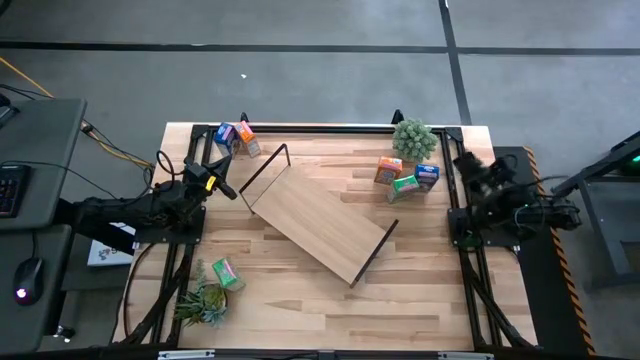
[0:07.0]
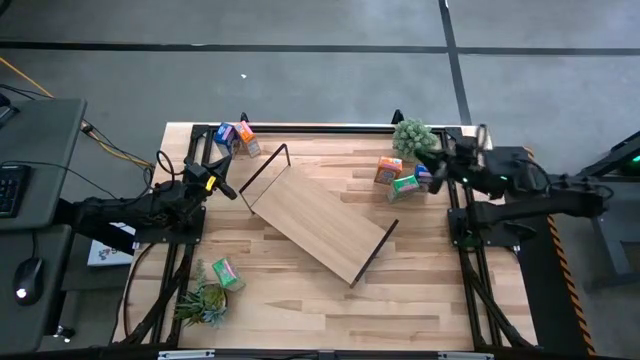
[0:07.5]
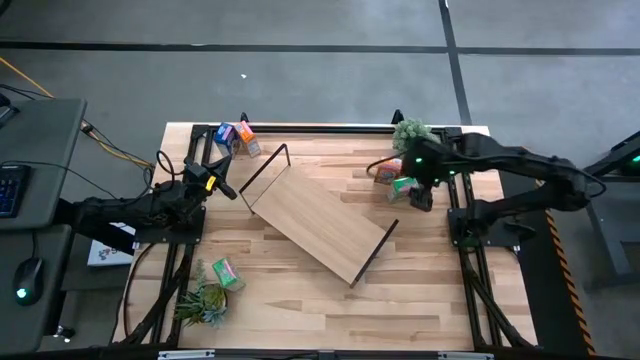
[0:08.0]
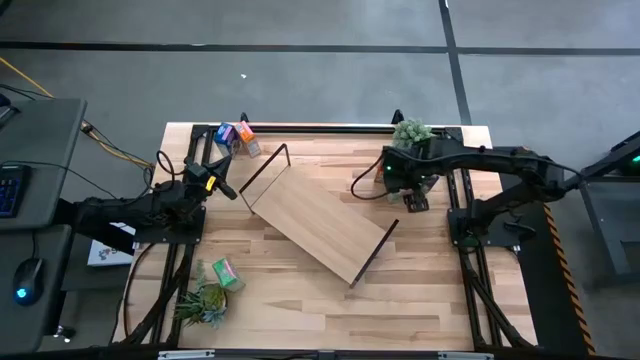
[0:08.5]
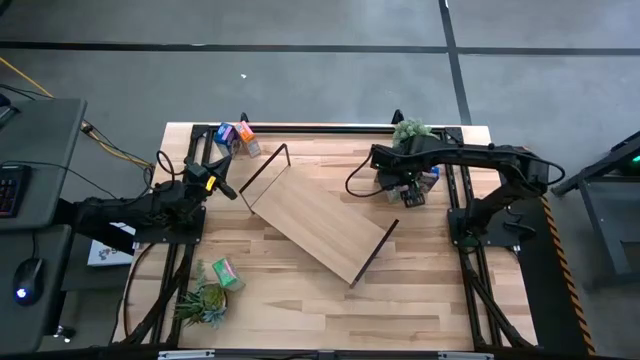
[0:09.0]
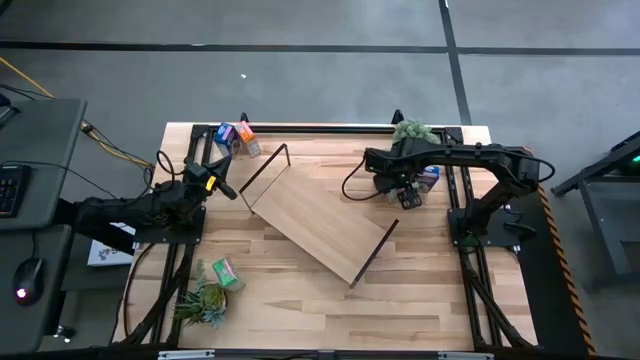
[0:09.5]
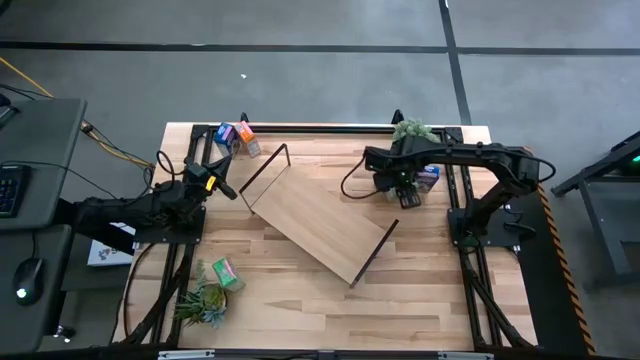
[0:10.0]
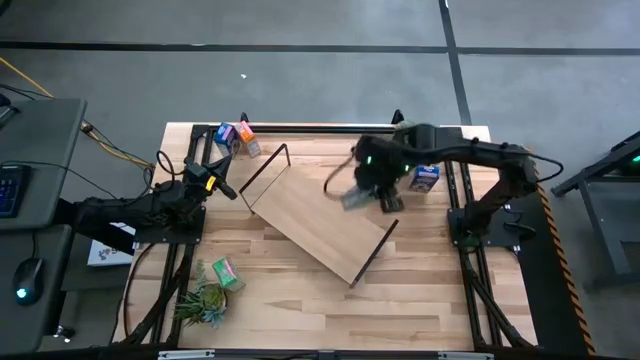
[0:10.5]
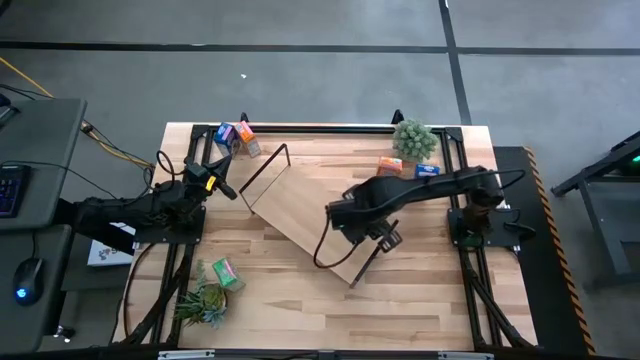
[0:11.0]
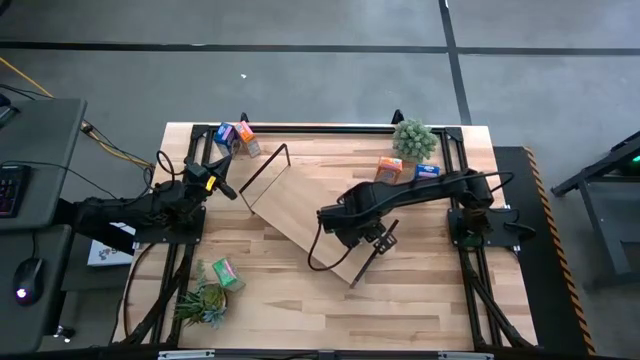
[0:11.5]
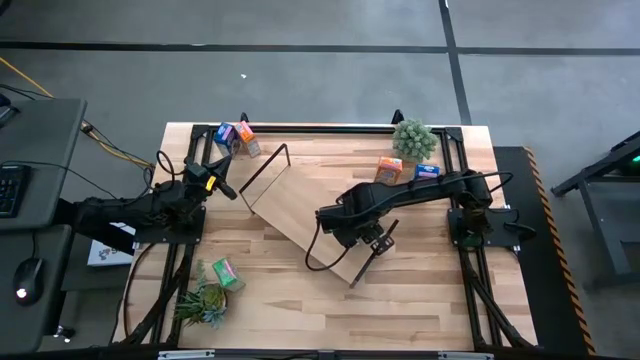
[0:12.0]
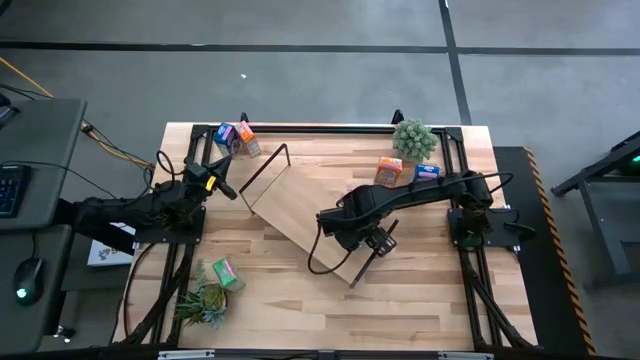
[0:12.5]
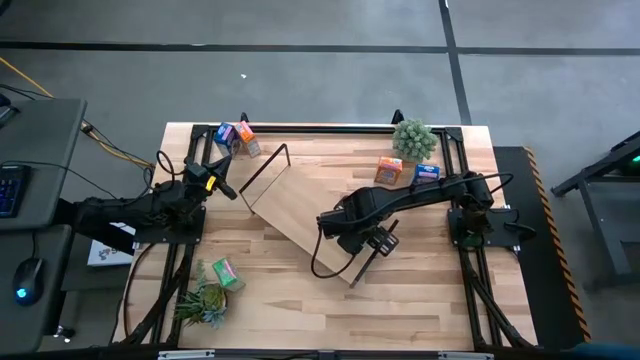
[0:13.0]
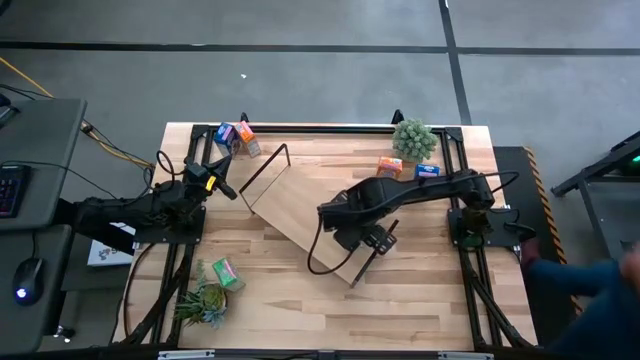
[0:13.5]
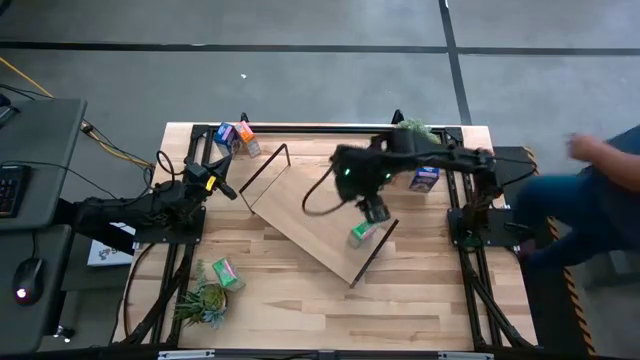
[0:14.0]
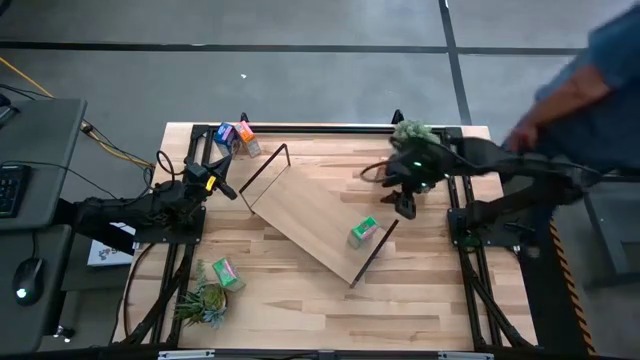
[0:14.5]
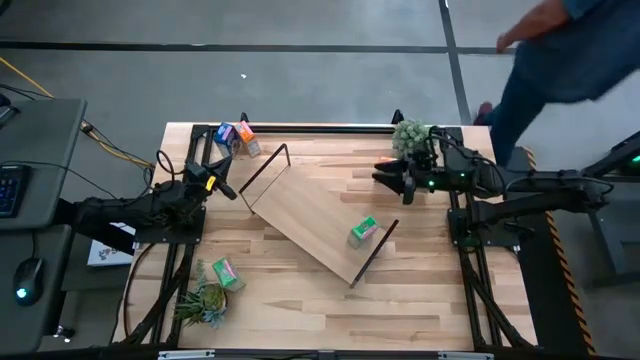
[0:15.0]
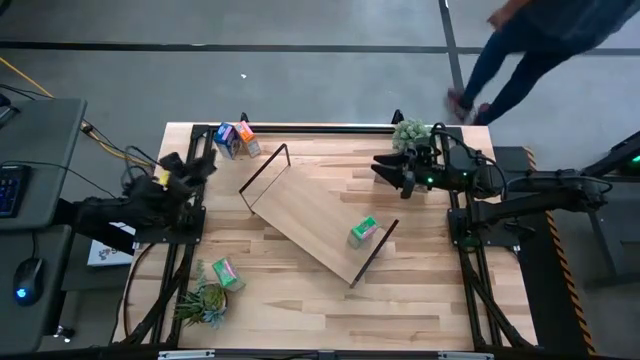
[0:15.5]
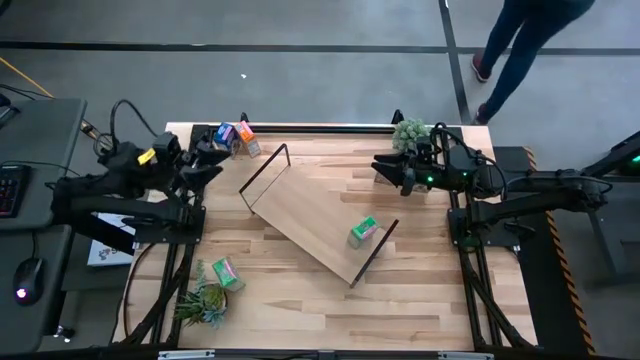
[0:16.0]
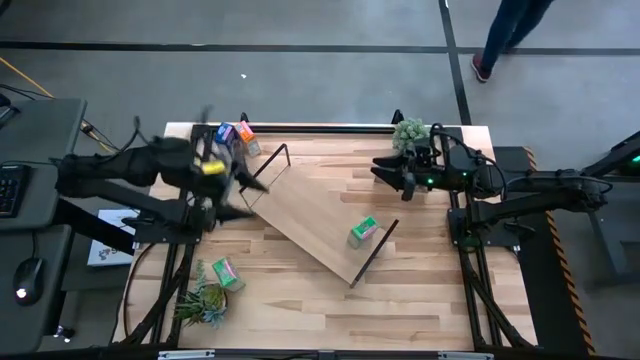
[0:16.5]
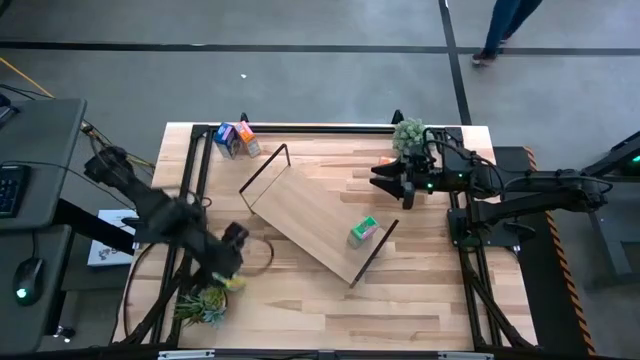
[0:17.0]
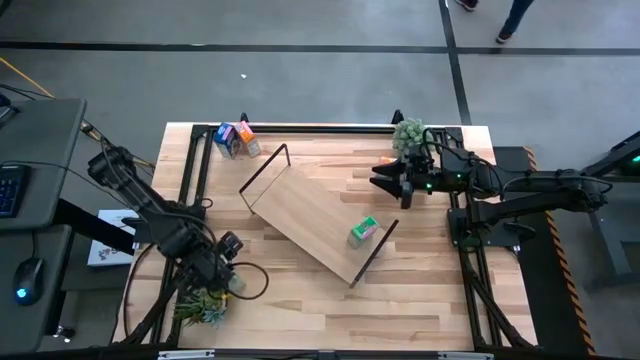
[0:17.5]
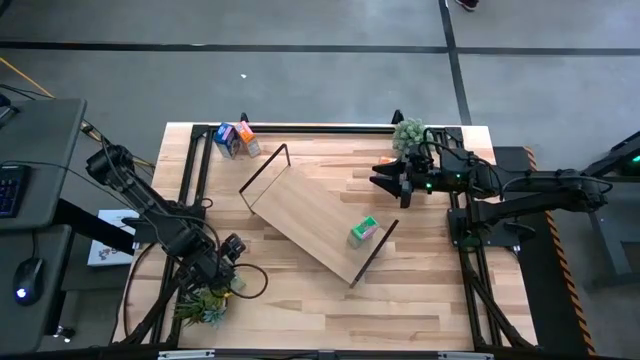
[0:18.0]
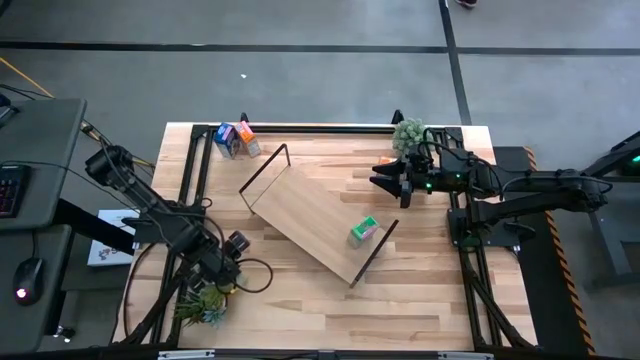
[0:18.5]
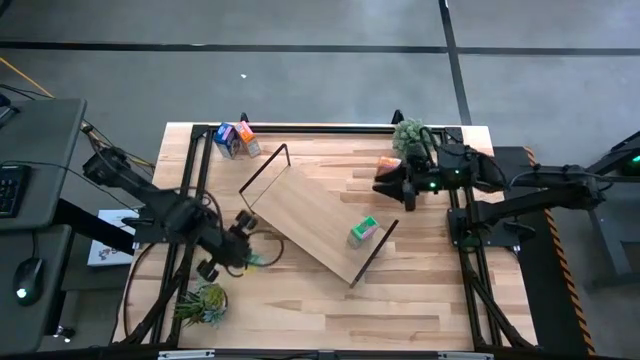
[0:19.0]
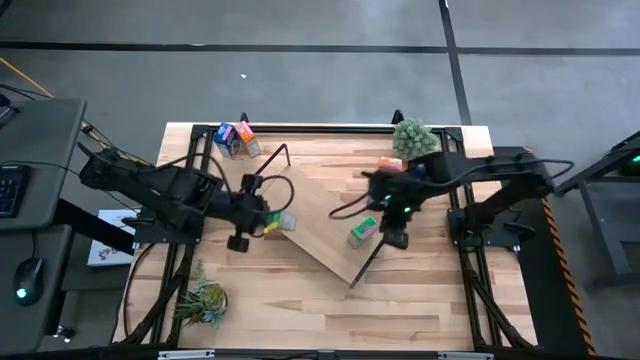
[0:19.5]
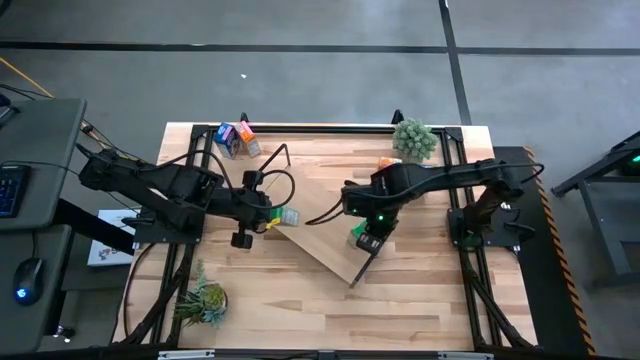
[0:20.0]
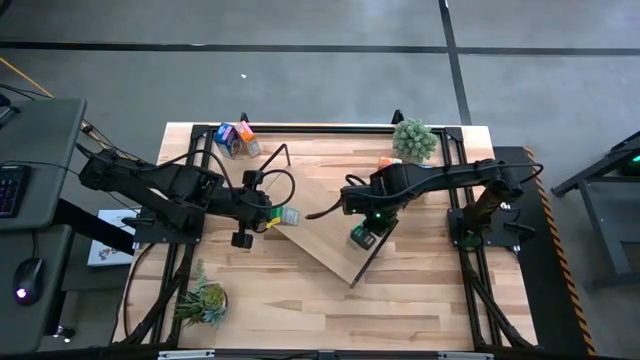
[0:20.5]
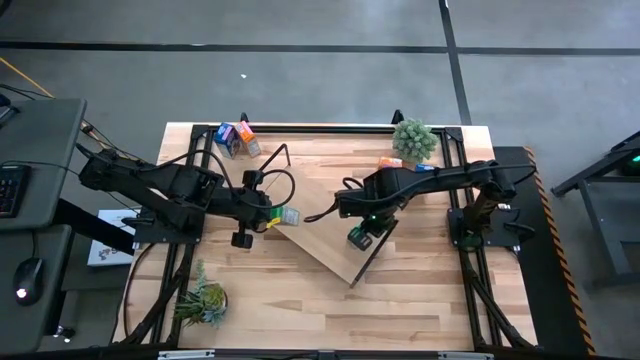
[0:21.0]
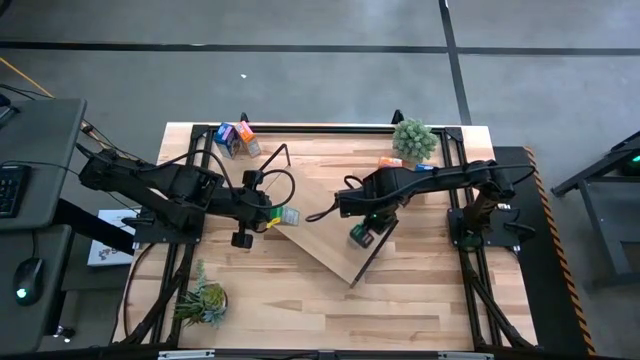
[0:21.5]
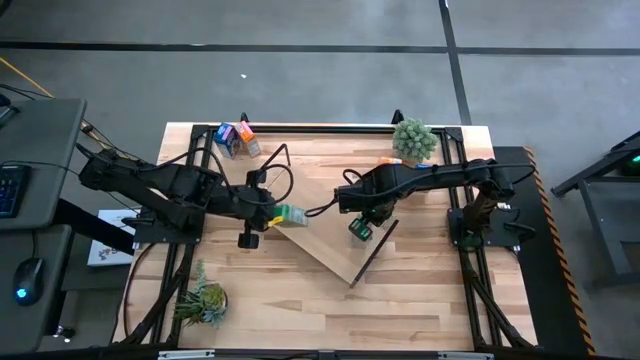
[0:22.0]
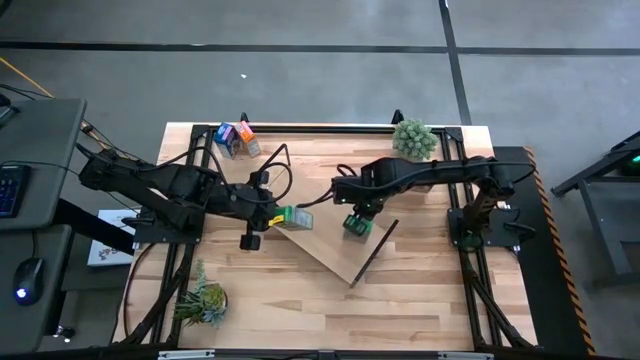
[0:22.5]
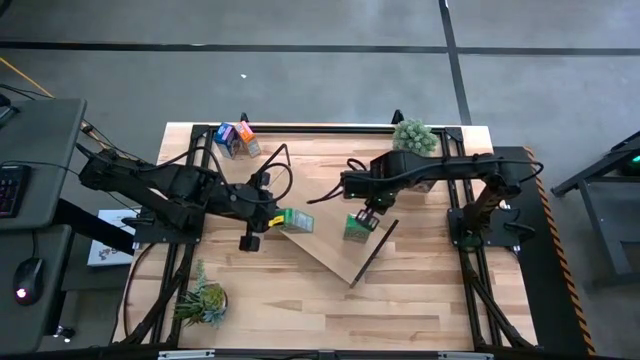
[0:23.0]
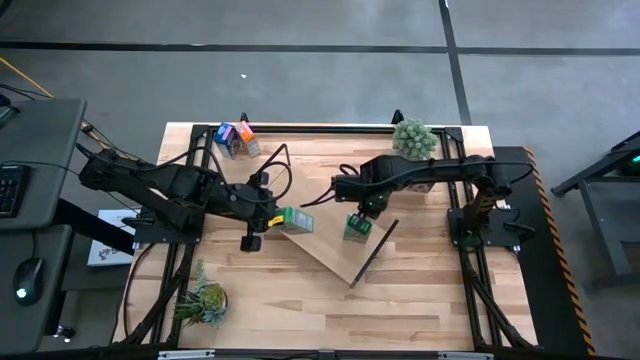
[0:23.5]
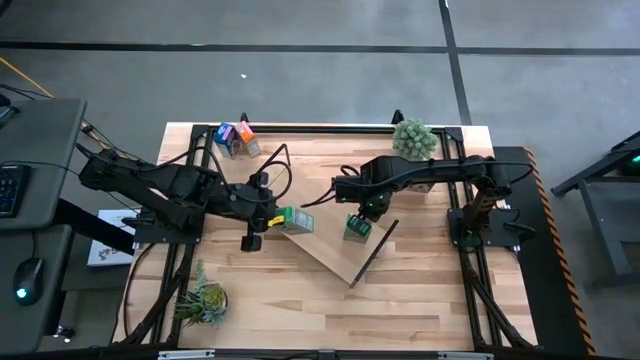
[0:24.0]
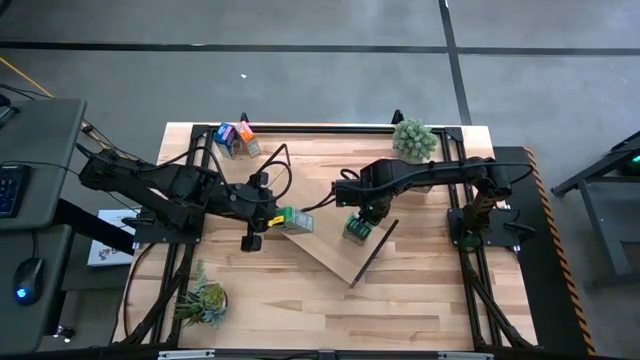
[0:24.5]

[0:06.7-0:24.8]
Task: Stack cereal on shelf
Put the top green cereal box on the shelf

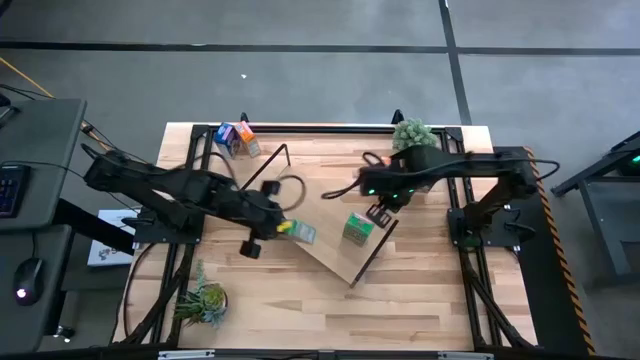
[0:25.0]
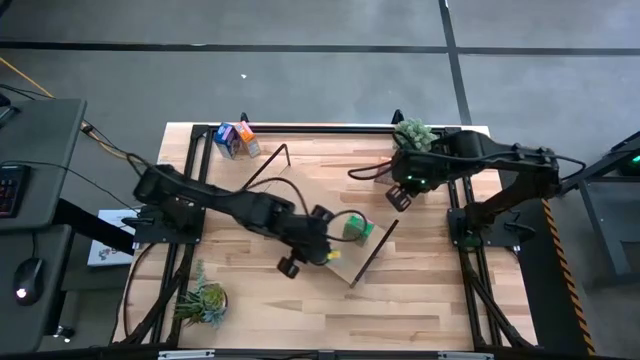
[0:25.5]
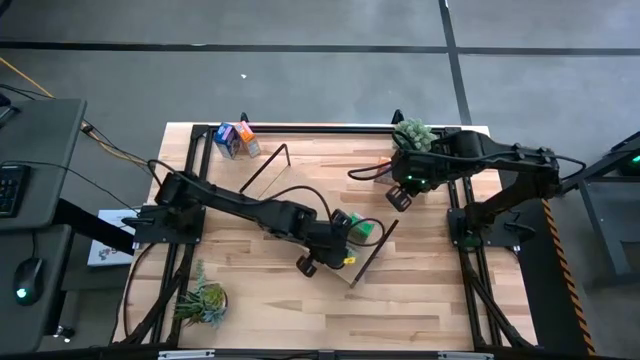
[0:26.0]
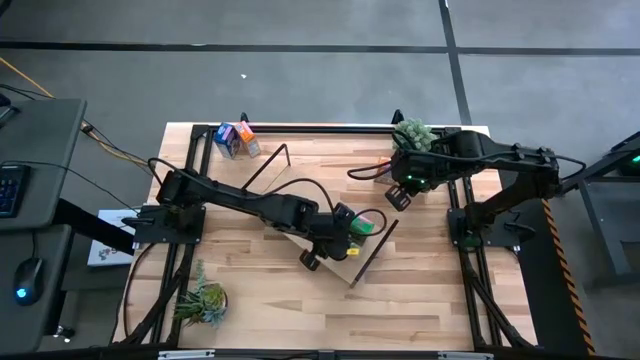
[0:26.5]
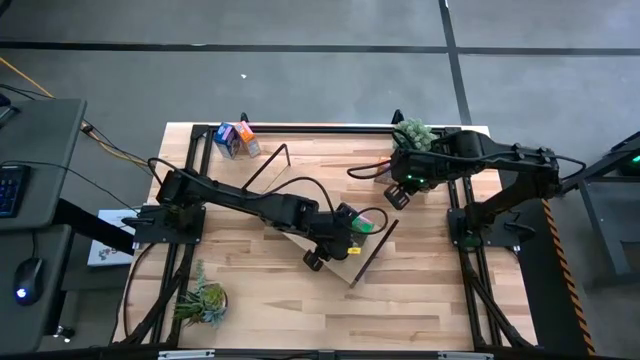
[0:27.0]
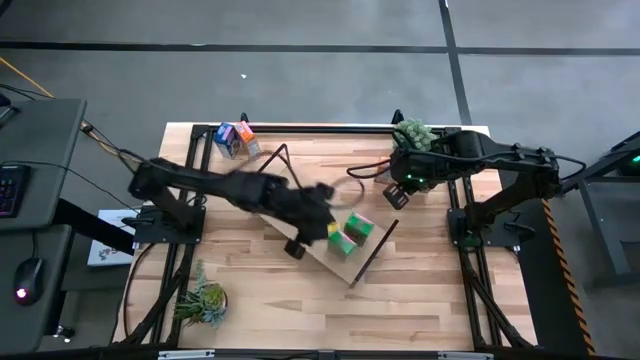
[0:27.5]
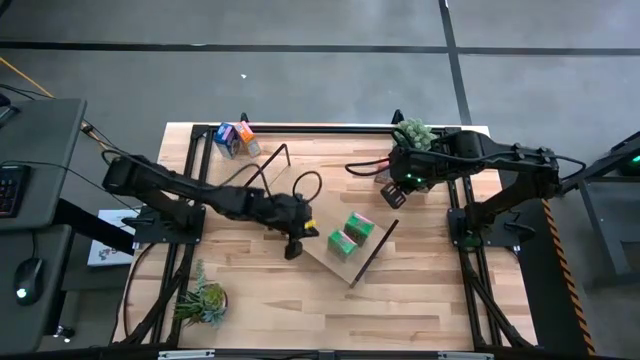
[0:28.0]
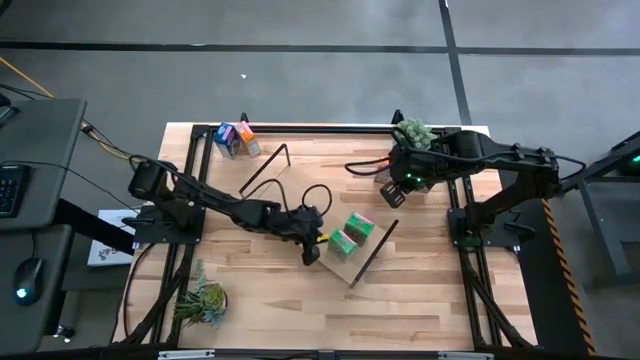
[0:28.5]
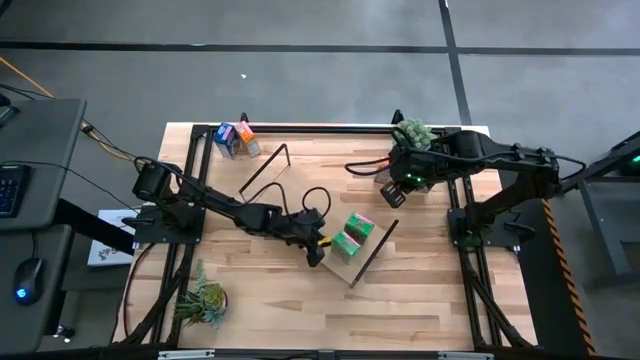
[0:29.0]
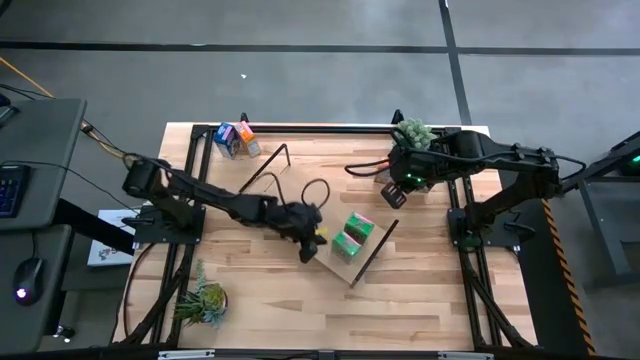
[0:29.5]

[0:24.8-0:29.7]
Put the green cereal box on the shelf aligned with the green cereal box
